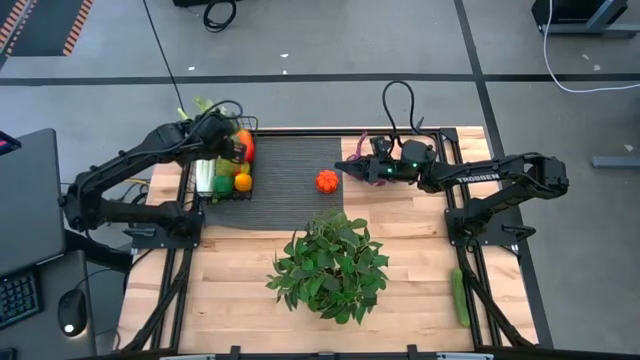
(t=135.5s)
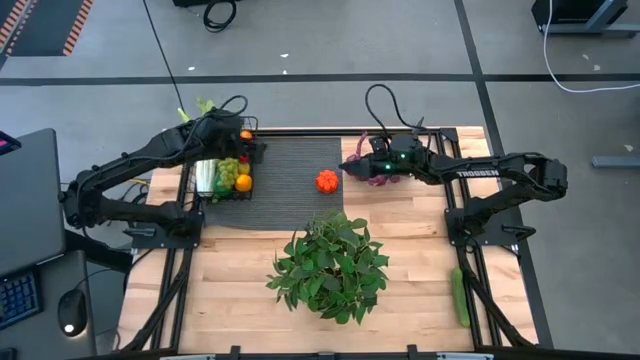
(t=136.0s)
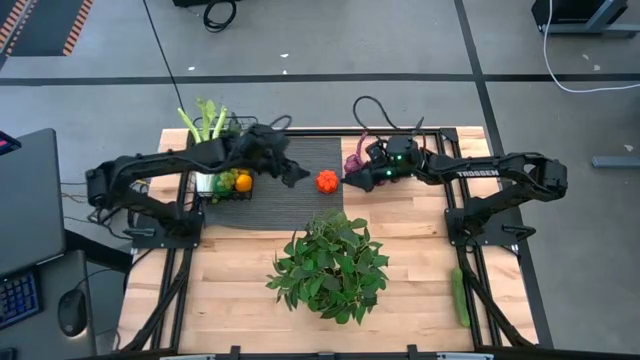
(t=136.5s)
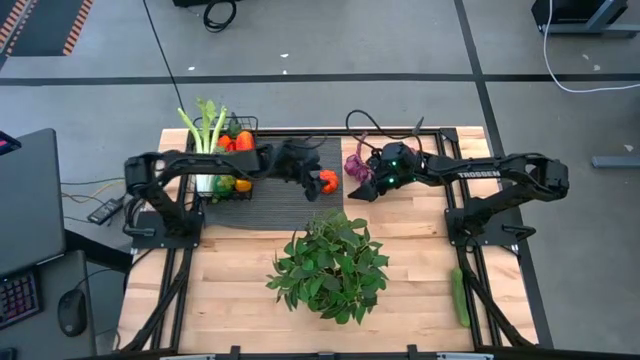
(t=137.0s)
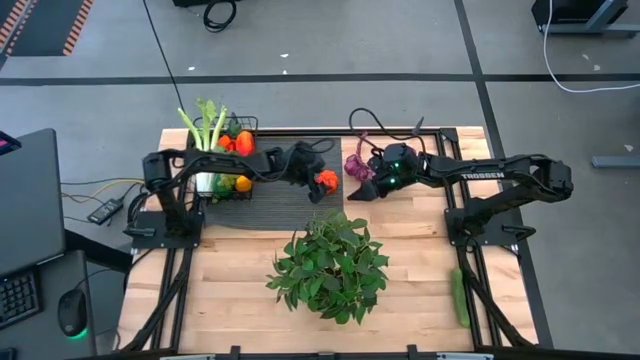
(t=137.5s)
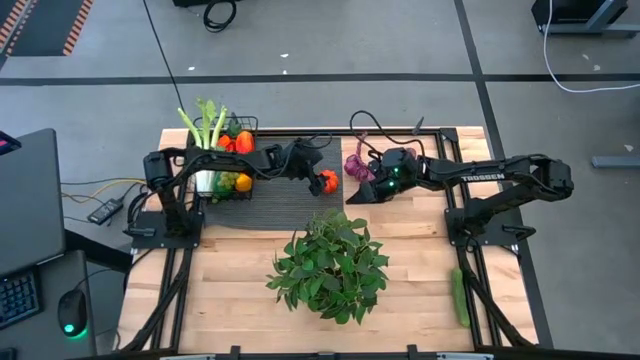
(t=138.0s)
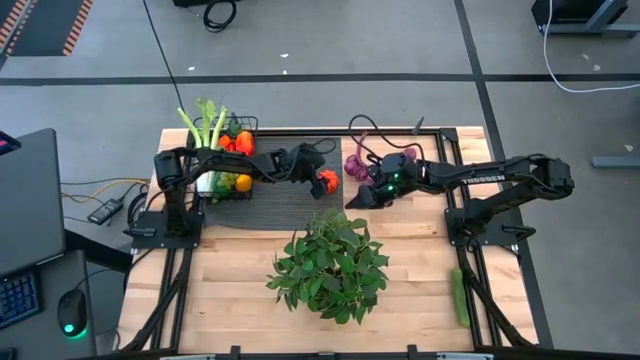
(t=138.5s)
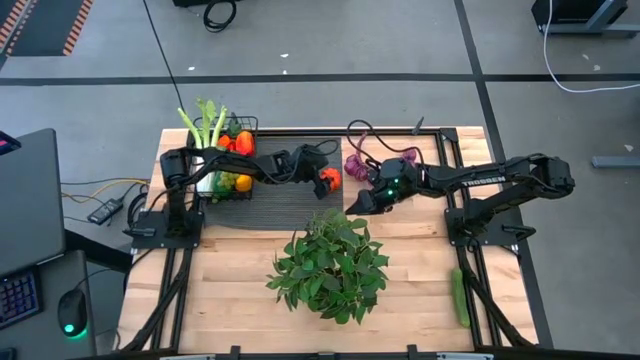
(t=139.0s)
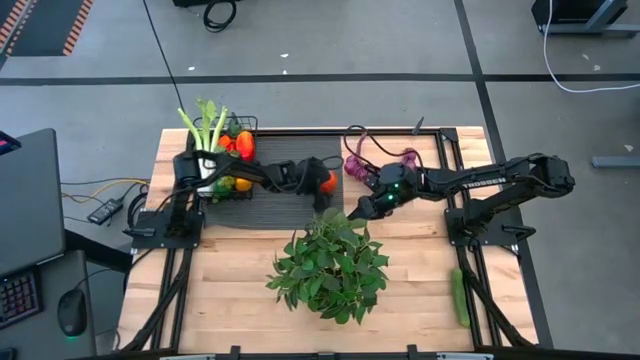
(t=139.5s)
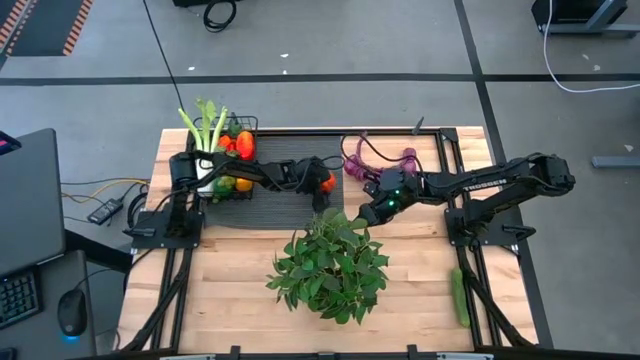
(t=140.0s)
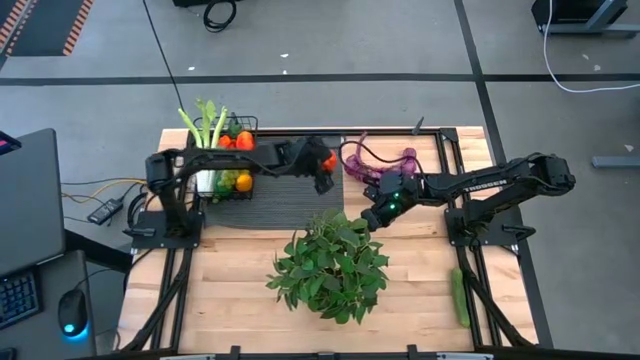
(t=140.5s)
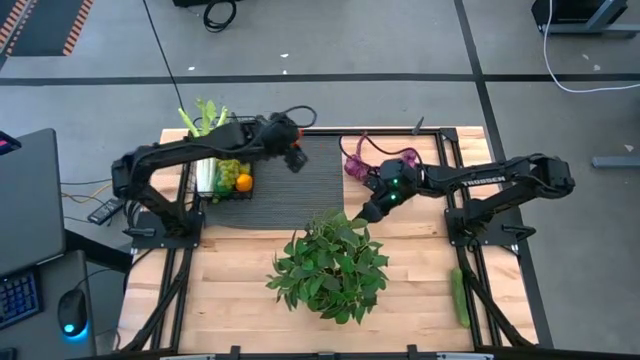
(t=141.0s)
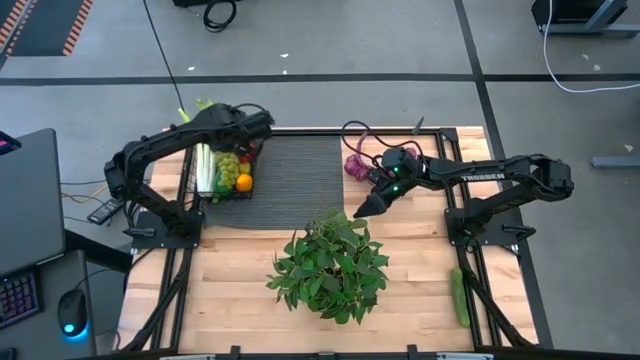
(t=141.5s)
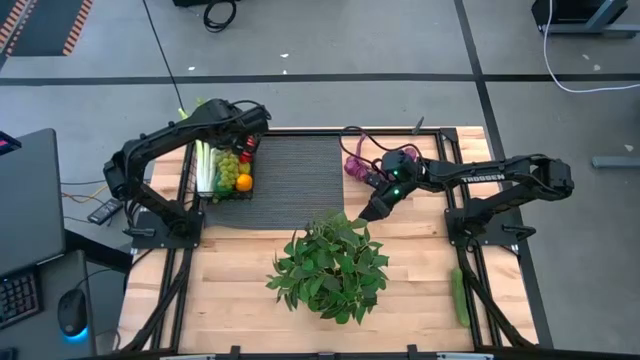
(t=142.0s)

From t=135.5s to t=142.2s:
Task: Build produce basket
Put the orange pumpkin into the wire basket

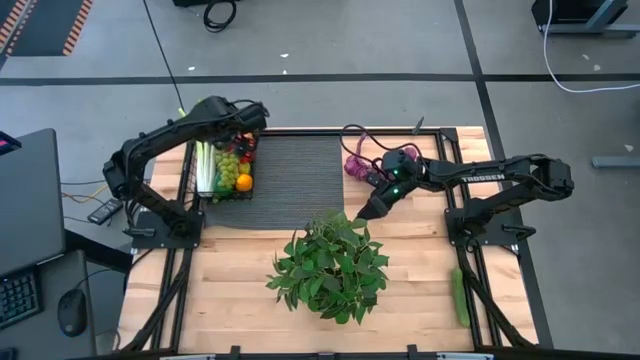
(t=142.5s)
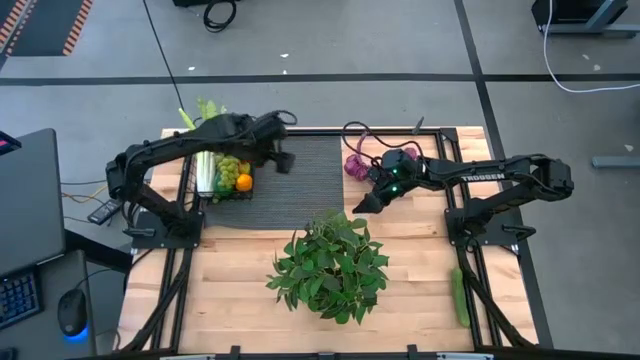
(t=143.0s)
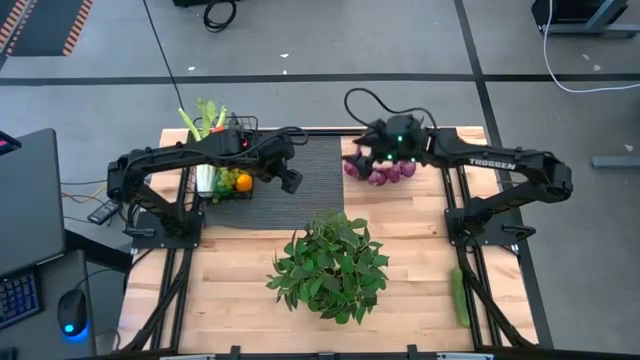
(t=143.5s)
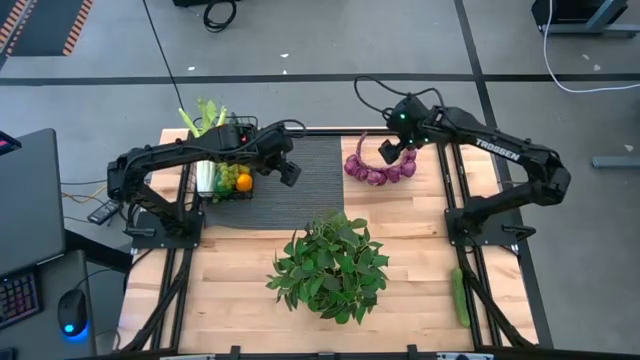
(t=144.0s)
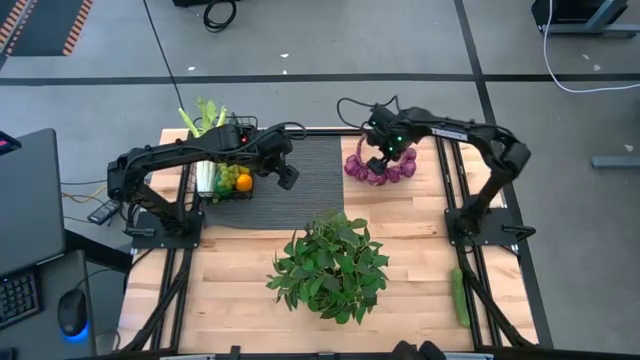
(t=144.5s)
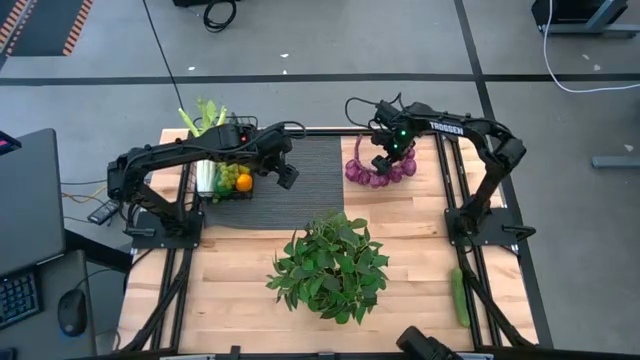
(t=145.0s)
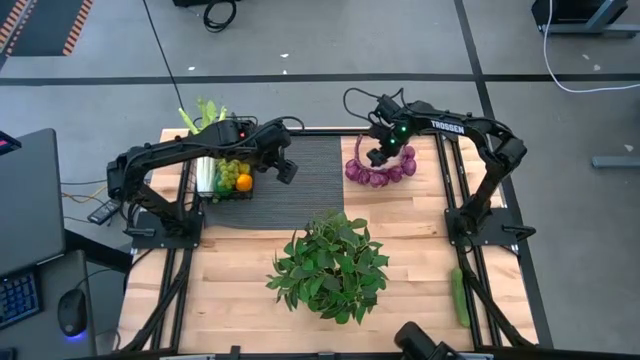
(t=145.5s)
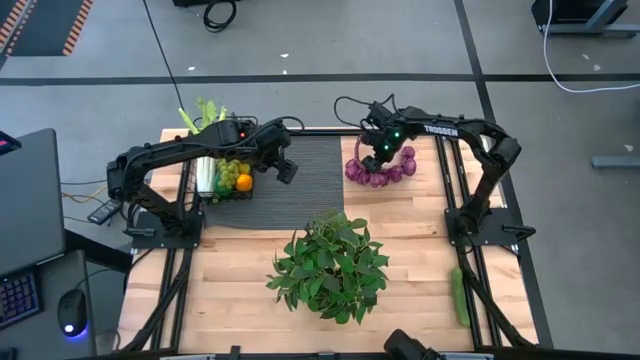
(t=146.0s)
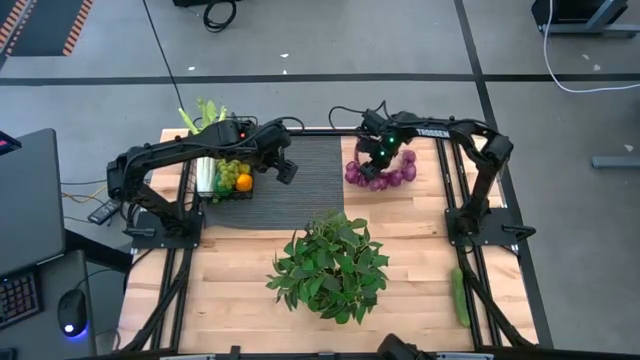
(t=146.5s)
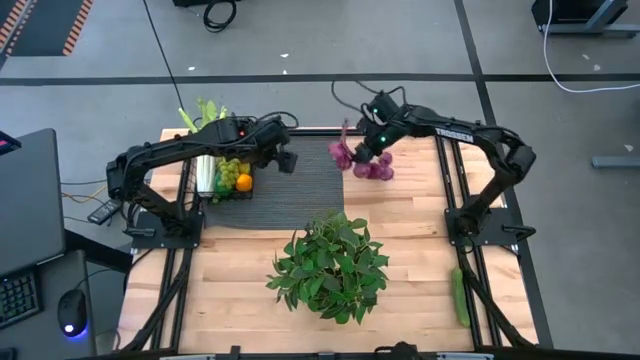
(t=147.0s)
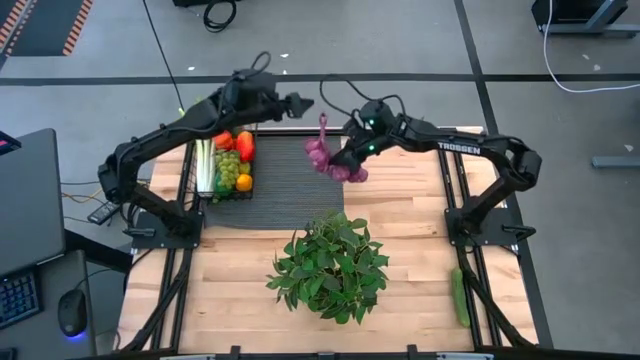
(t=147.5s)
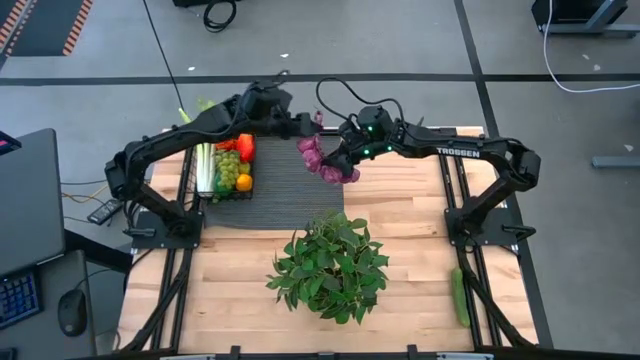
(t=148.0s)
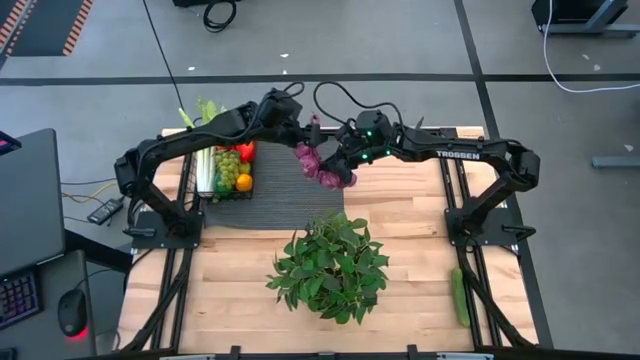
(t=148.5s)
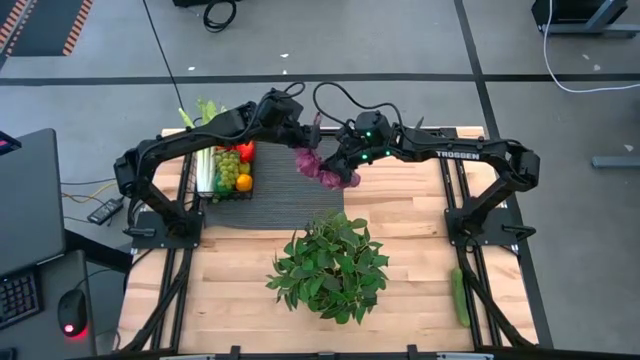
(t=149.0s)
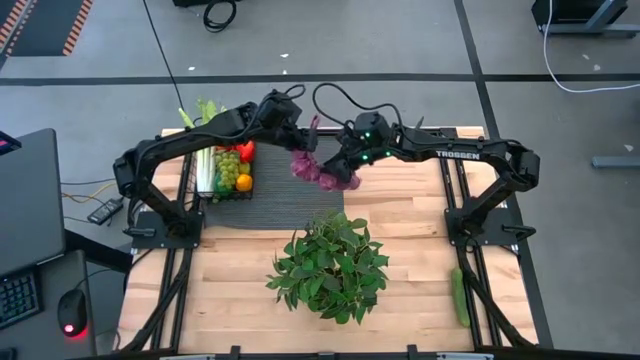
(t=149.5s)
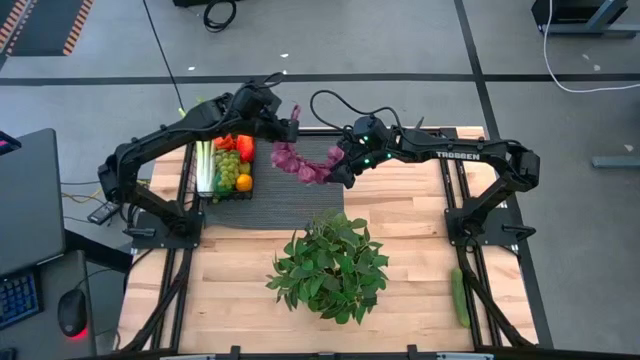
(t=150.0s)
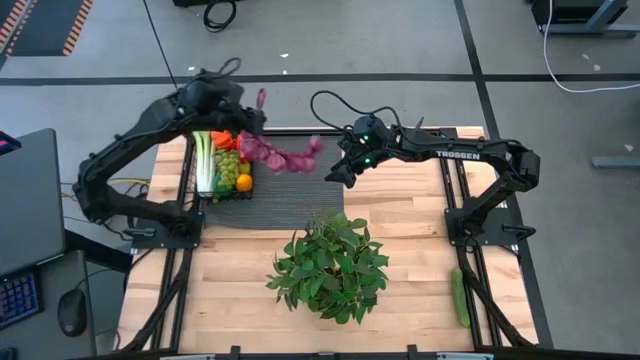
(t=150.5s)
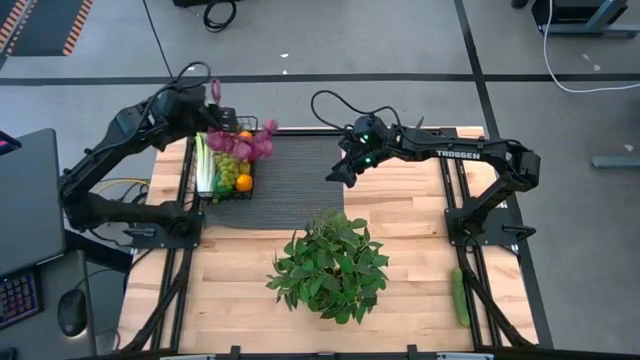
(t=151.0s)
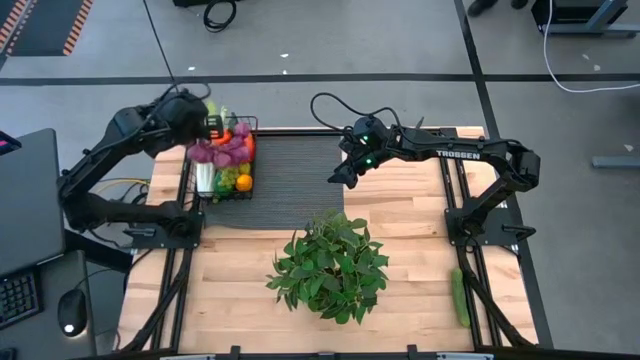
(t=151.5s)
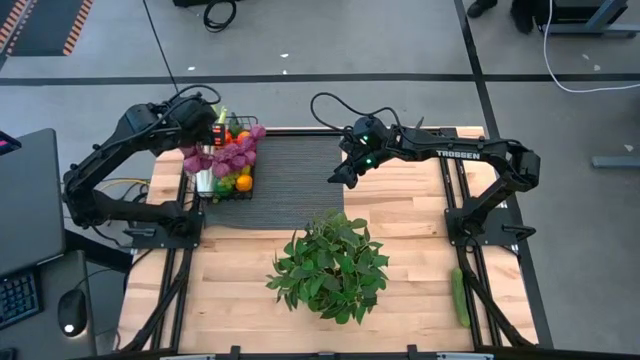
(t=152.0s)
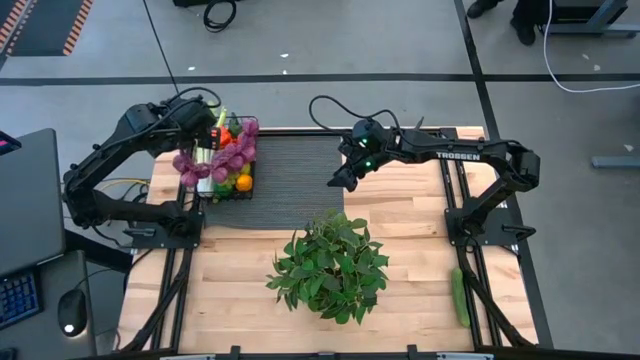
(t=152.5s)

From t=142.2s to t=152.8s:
Put the purple garlic into the wire basket
